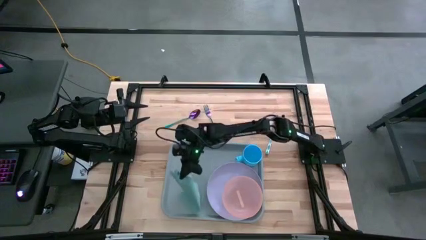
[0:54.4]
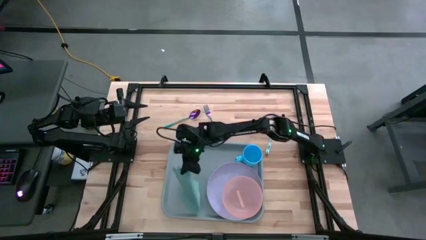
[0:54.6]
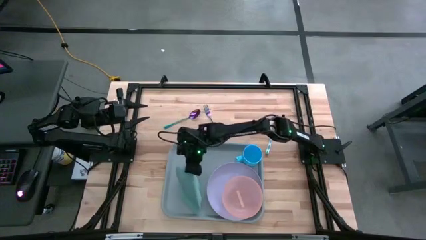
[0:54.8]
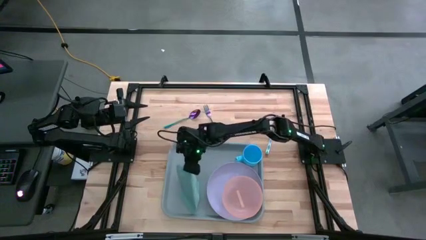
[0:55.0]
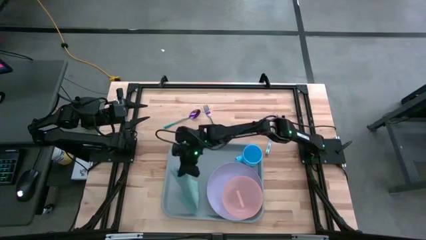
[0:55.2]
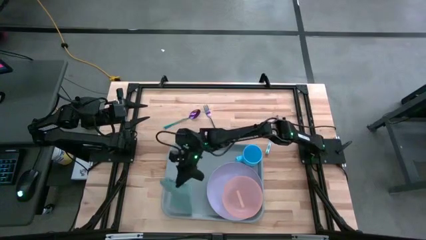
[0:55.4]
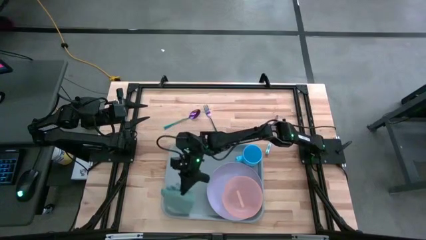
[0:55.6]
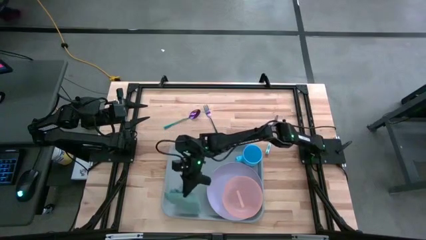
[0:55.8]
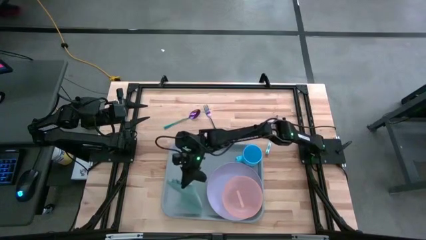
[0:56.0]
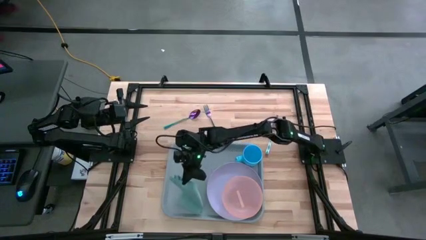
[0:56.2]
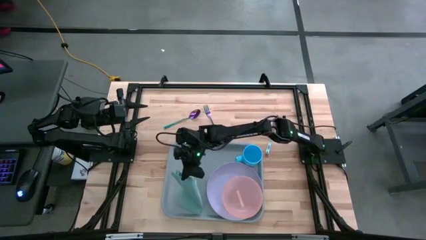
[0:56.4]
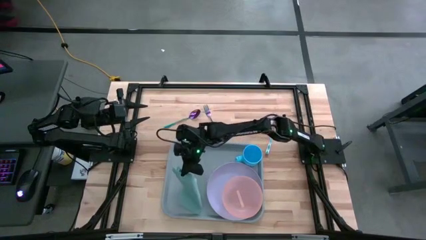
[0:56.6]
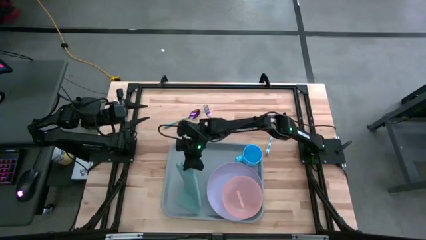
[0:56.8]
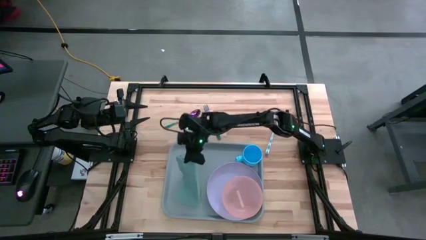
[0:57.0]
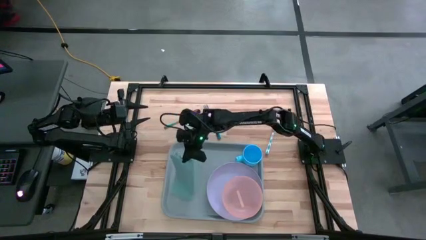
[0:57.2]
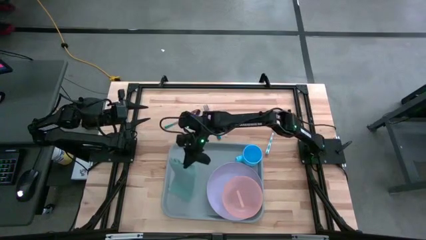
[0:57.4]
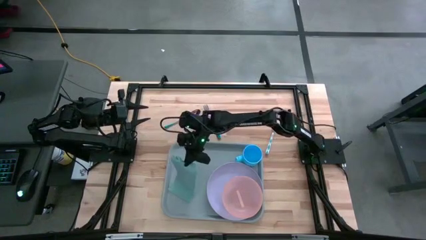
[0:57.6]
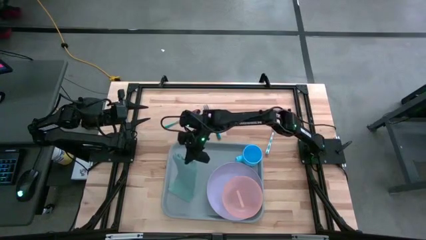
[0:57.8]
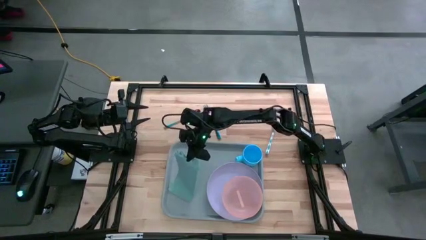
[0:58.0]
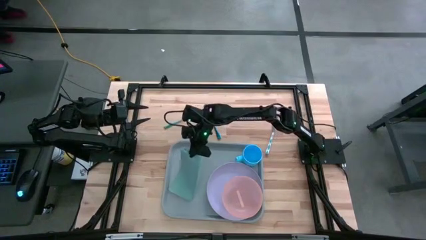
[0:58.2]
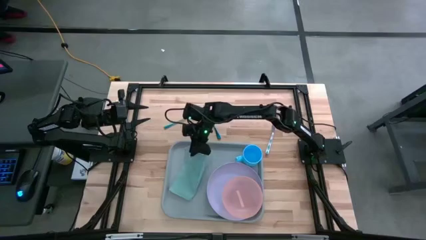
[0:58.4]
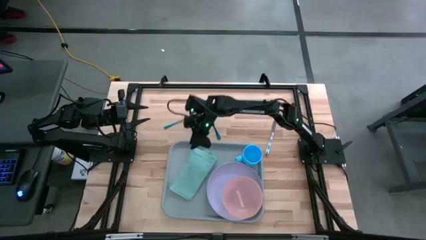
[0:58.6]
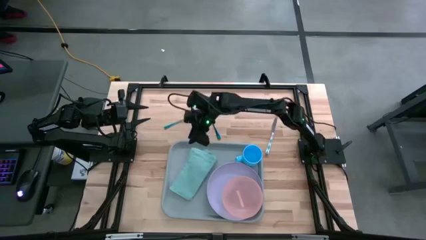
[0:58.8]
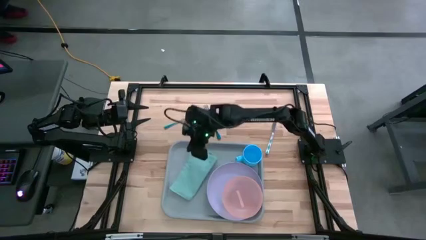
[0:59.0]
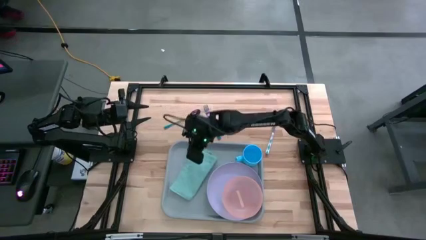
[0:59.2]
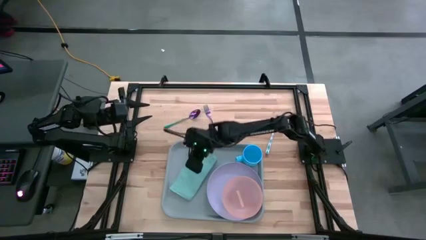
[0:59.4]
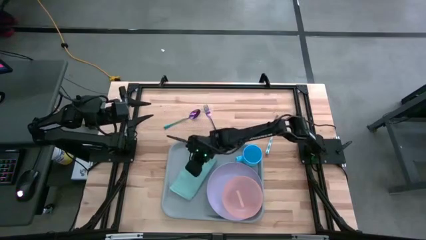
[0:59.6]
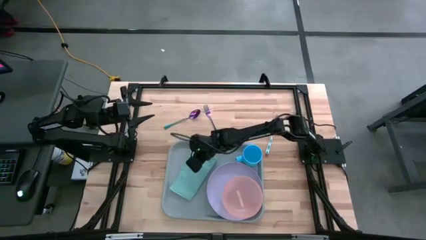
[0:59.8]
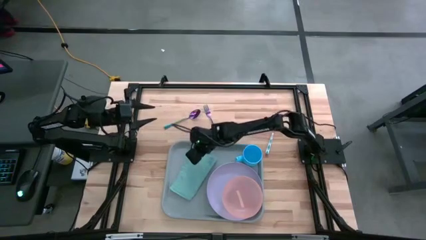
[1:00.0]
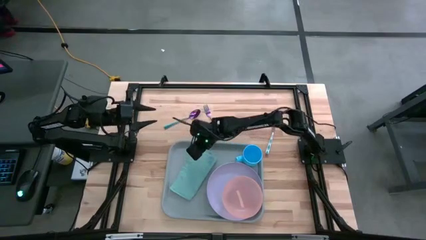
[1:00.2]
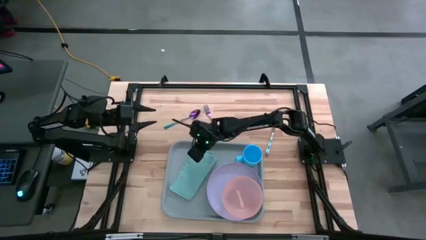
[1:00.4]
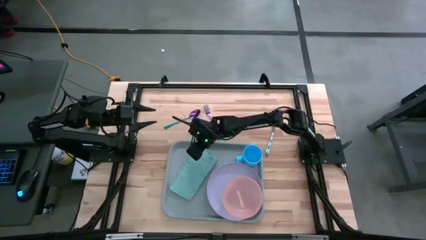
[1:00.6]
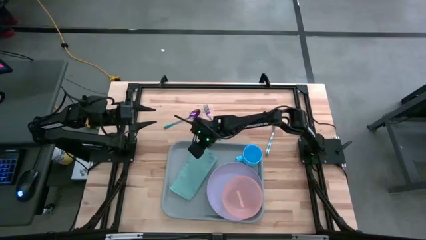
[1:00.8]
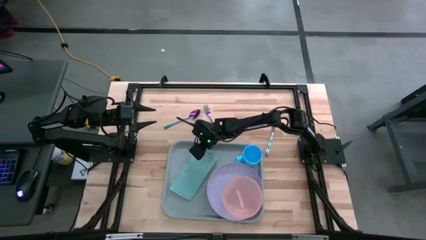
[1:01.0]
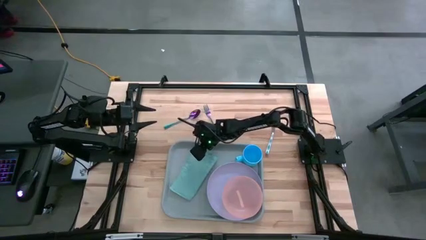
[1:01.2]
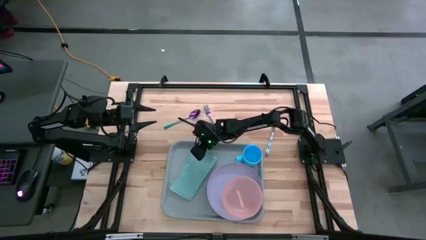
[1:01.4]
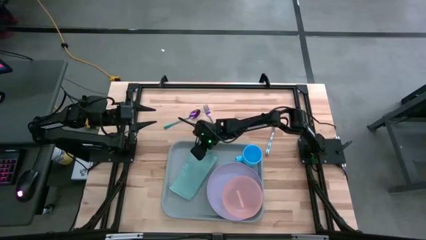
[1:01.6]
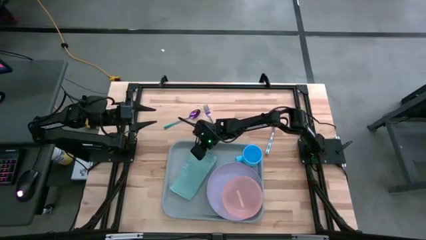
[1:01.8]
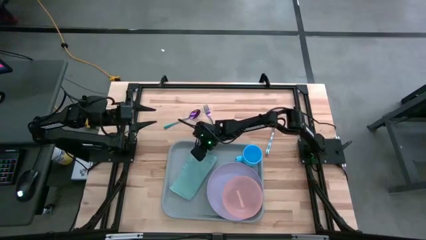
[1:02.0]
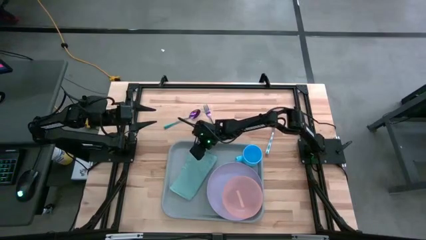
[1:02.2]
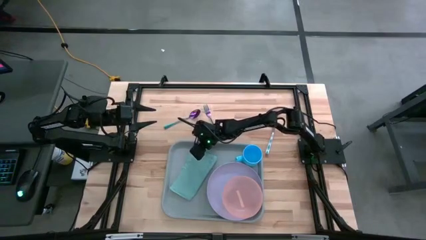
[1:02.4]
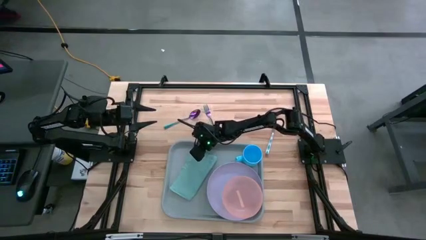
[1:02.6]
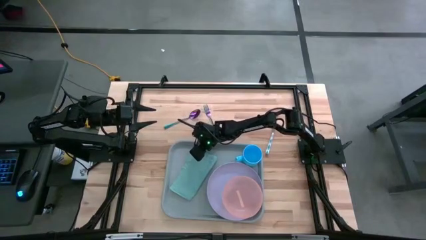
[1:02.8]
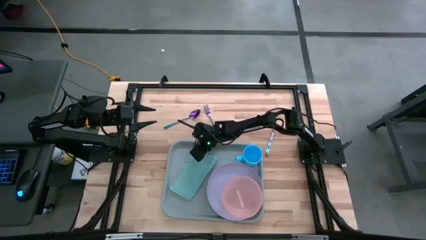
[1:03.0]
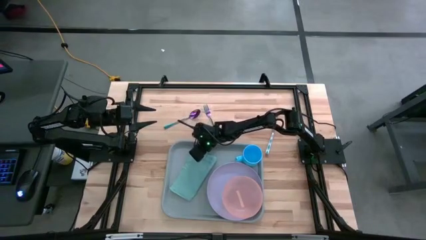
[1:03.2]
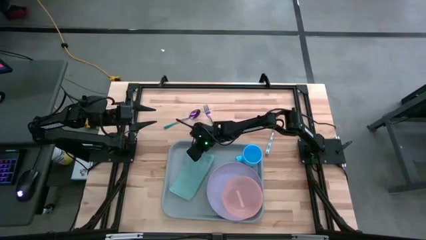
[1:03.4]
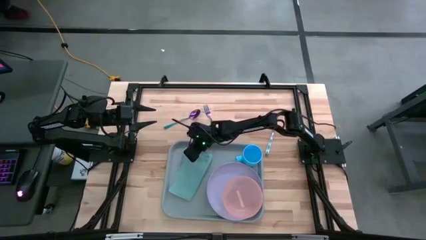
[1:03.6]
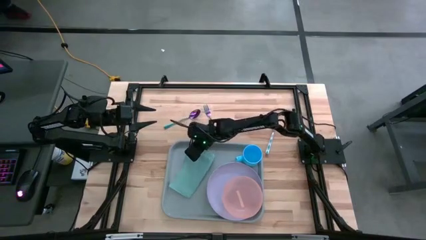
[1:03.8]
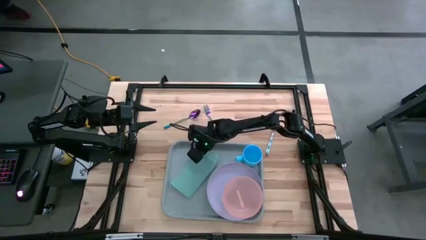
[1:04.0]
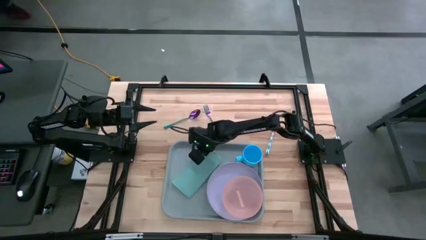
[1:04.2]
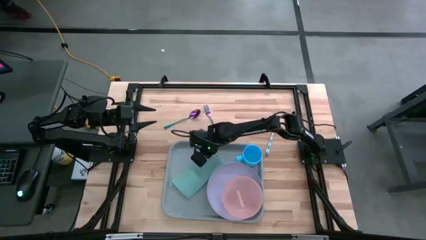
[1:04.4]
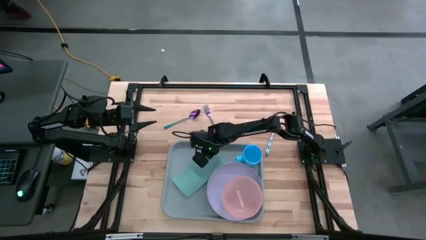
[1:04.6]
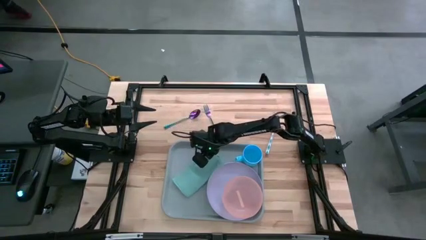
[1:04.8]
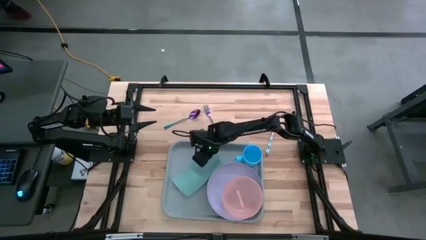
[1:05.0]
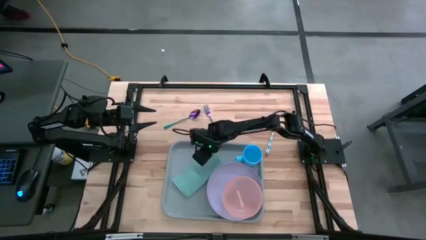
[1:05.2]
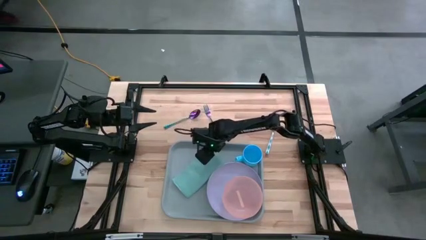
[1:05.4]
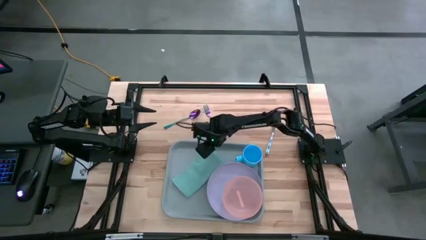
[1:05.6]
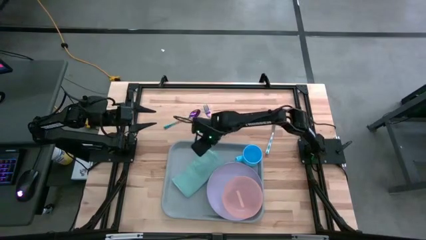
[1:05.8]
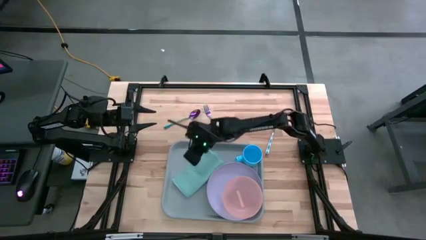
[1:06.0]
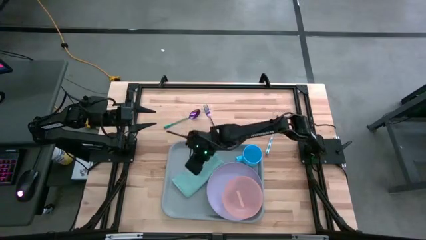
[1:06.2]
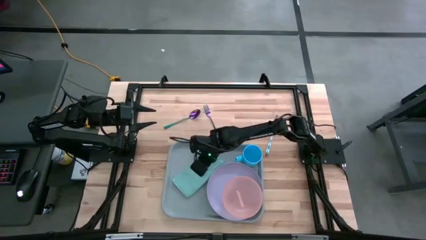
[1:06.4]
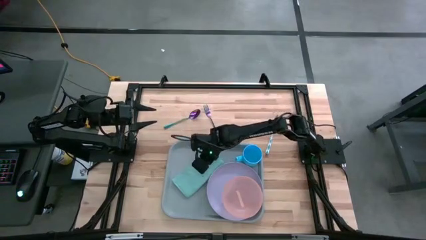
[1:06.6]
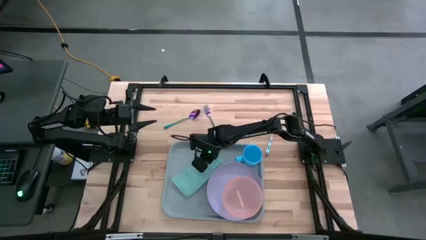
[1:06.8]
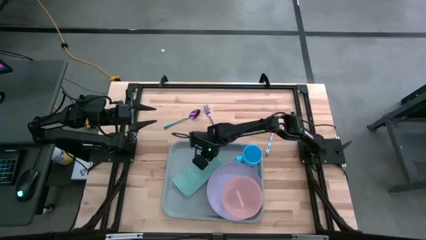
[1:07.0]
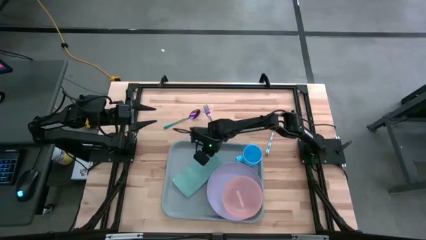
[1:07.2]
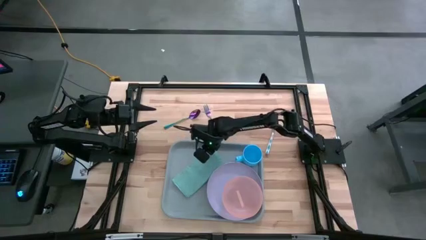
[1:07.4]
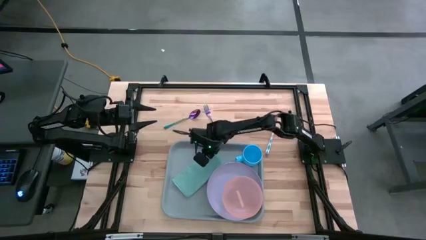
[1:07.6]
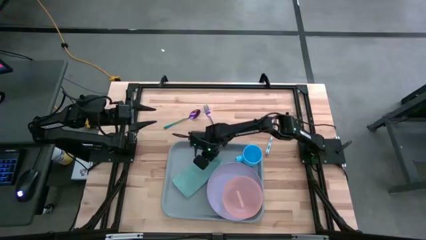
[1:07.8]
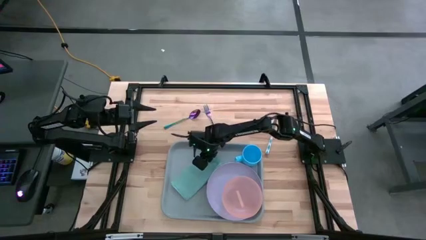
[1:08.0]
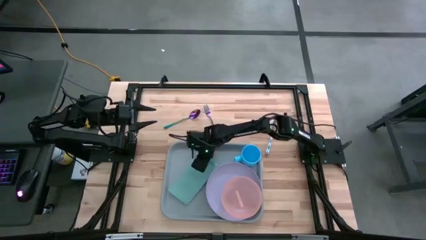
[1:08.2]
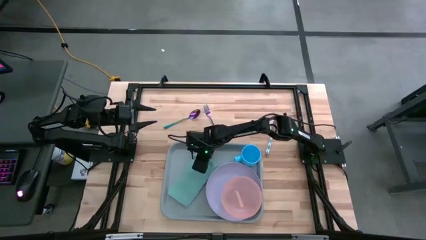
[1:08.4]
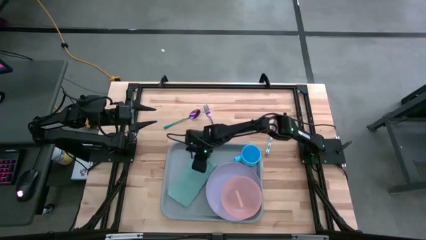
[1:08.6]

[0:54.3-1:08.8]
Task: Set up tray
Put the blue napkin on the serving tray to the left of the purple plate
